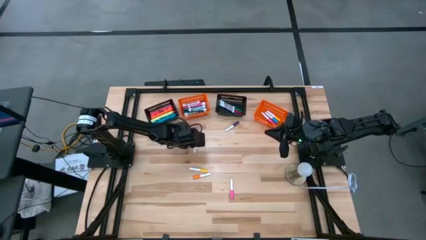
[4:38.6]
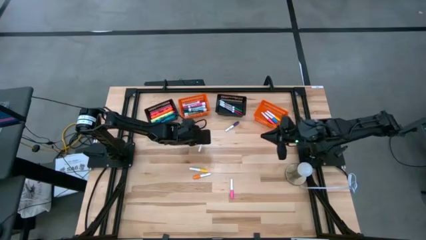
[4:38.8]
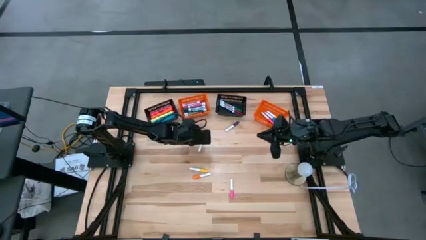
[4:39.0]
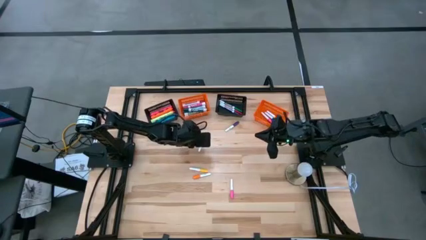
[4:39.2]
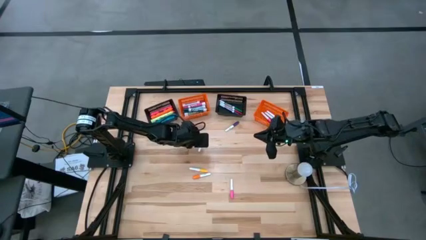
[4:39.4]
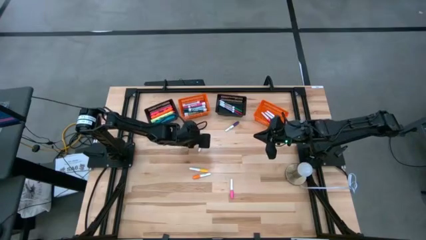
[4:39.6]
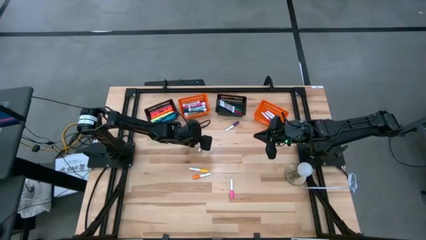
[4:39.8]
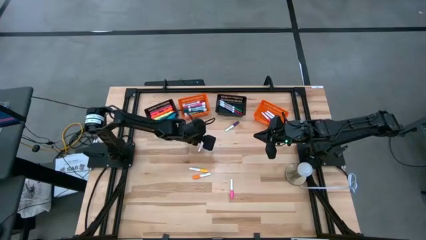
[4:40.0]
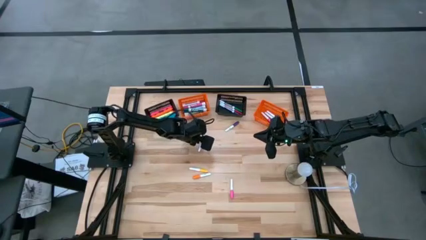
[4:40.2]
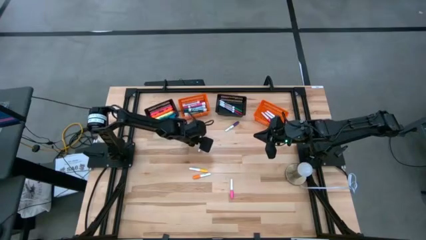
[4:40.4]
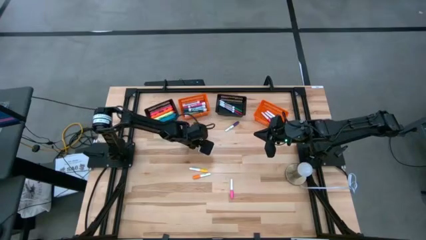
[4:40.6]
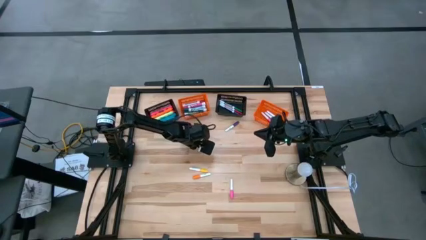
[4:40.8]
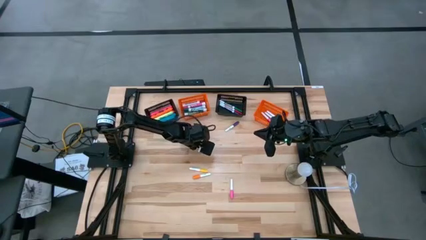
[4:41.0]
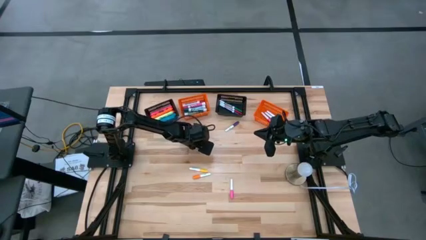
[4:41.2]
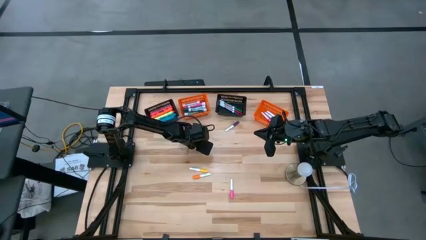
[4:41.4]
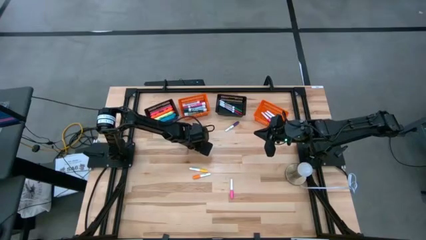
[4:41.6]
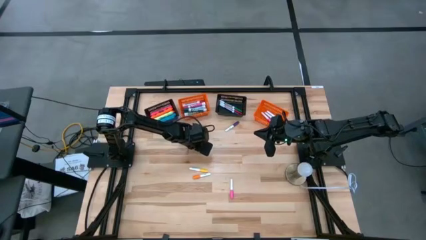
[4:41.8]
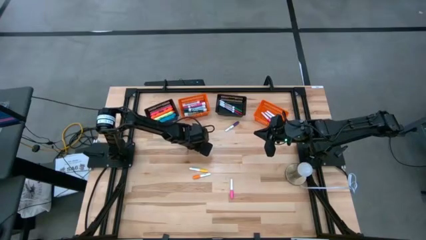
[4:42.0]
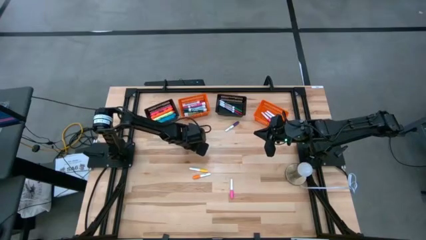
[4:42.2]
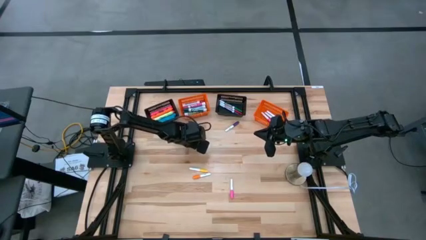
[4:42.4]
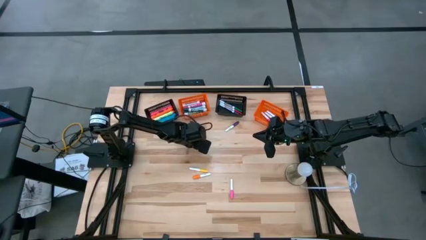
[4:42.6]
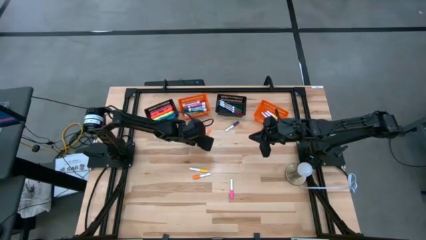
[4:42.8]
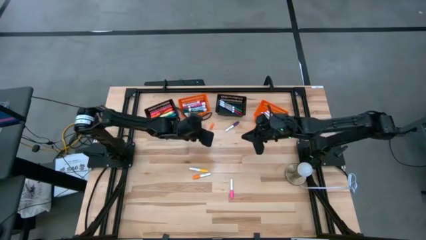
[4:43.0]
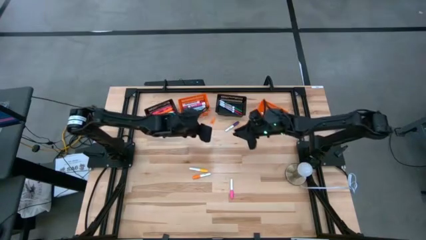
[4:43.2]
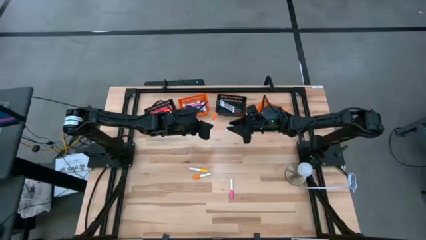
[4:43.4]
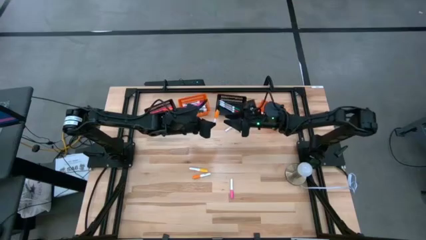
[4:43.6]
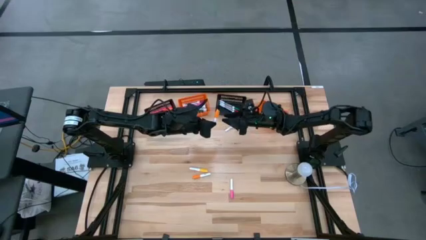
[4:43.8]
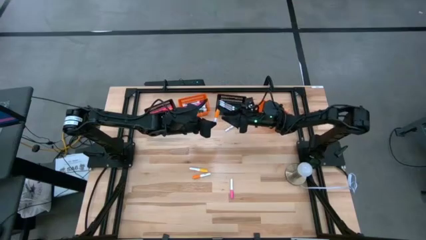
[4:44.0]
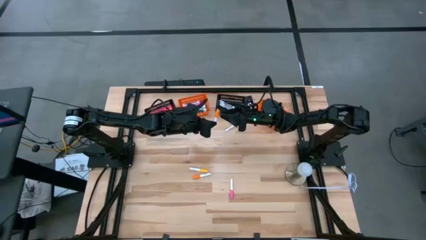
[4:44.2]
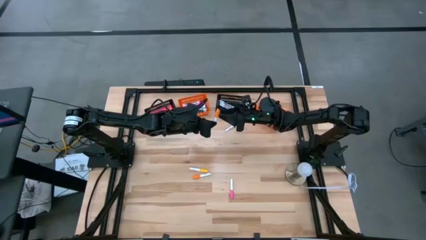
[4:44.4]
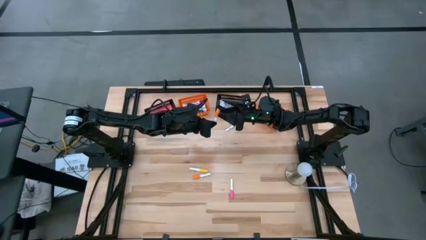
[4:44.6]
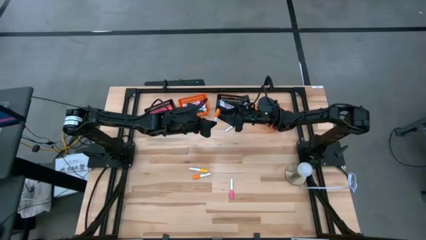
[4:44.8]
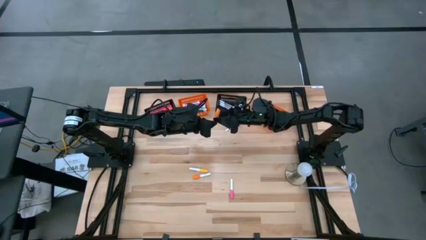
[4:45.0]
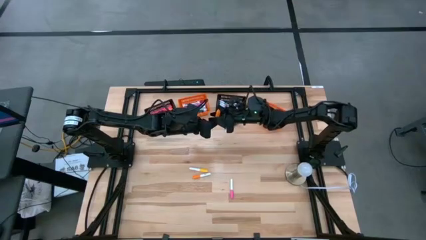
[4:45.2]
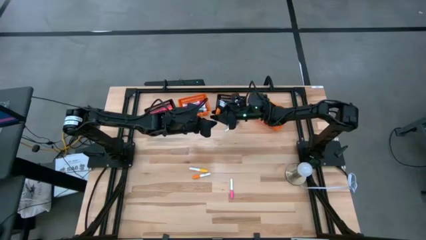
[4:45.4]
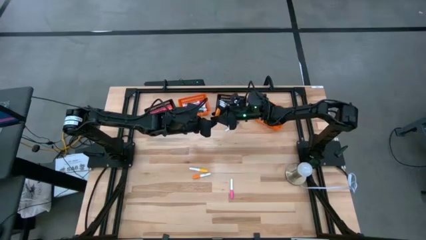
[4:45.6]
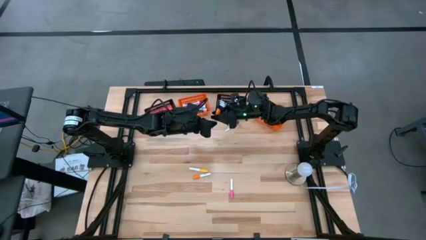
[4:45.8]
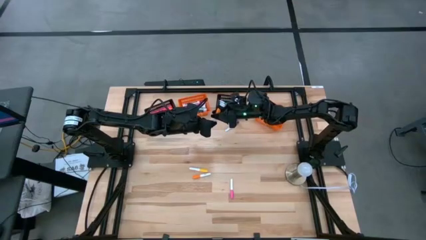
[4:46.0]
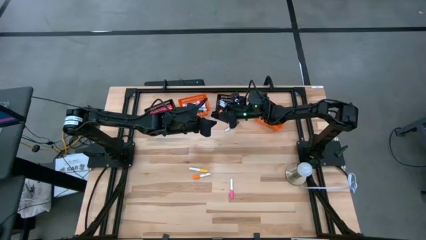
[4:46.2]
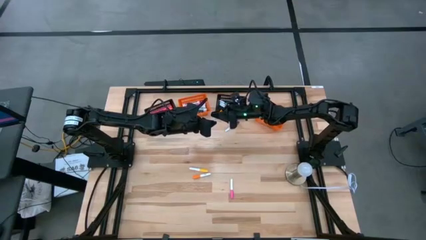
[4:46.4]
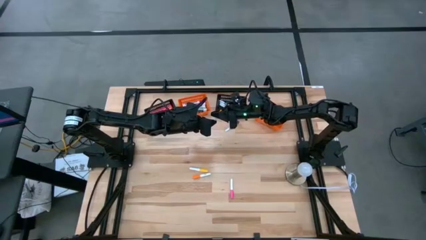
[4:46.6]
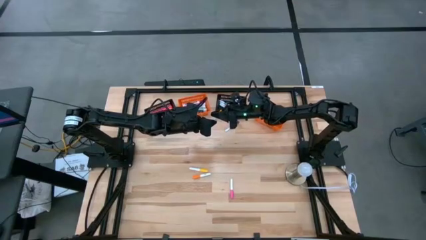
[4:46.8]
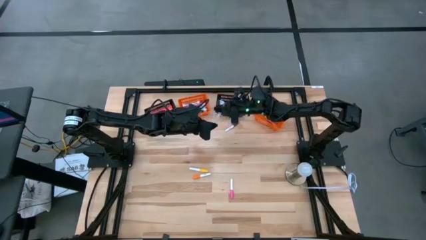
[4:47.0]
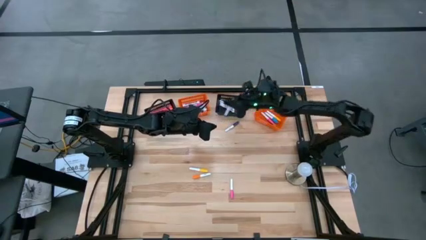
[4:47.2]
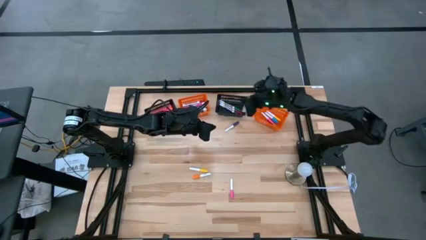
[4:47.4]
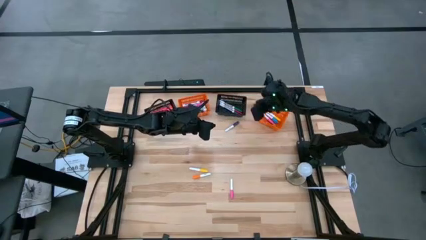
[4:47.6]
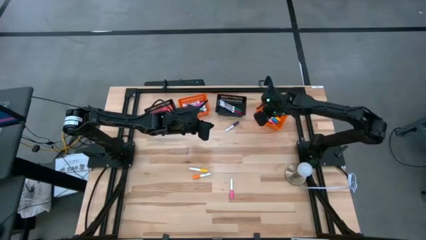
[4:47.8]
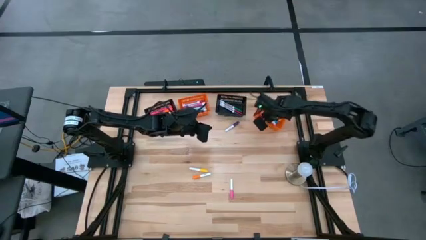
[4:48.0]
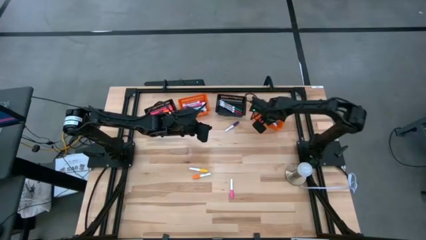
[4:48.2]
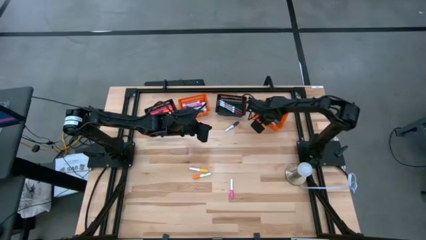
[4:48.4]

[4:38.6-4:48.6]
Task: Pick & Place Markers
Put the orange small highlighter pen into the left orange bin

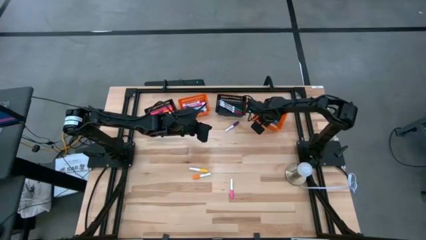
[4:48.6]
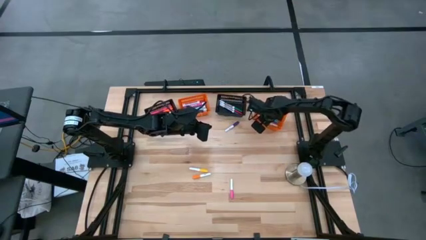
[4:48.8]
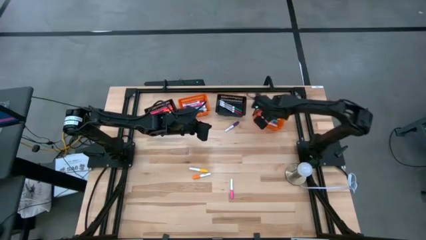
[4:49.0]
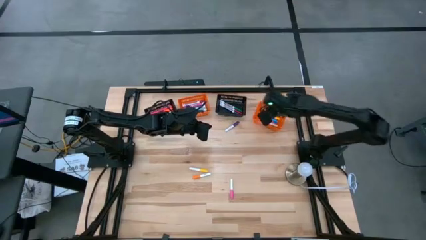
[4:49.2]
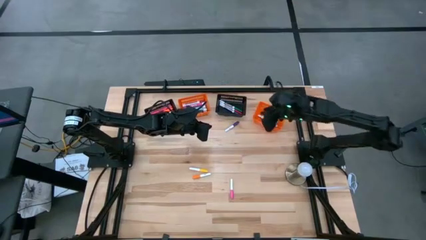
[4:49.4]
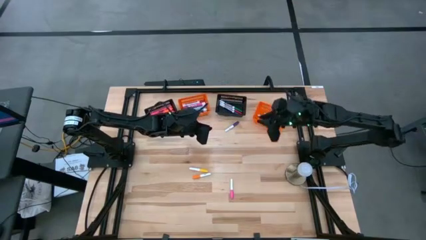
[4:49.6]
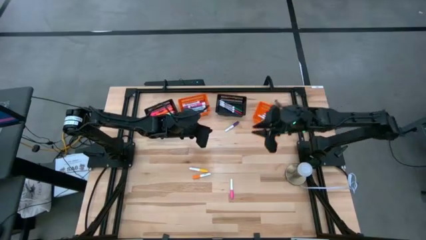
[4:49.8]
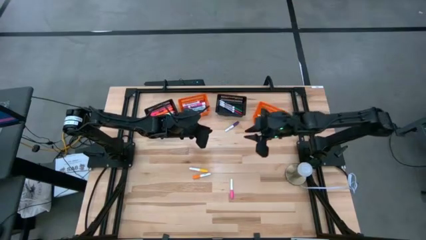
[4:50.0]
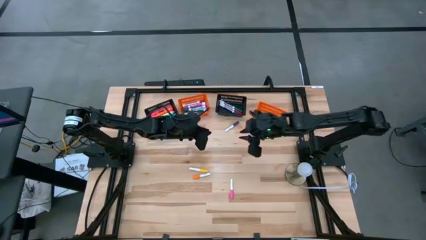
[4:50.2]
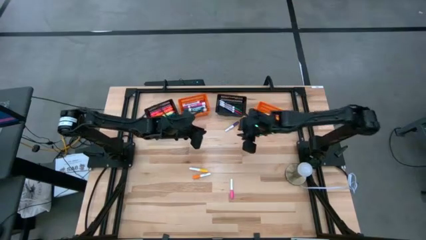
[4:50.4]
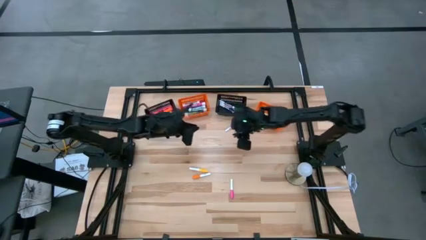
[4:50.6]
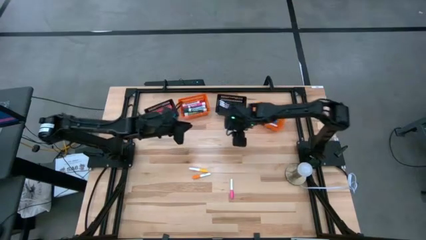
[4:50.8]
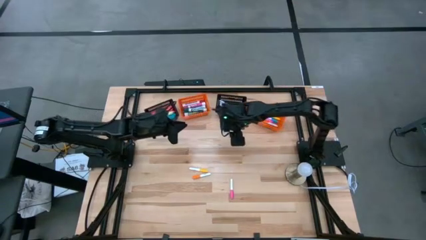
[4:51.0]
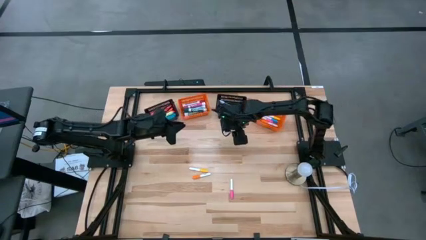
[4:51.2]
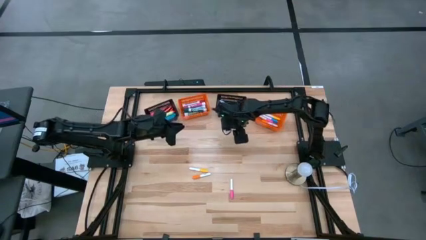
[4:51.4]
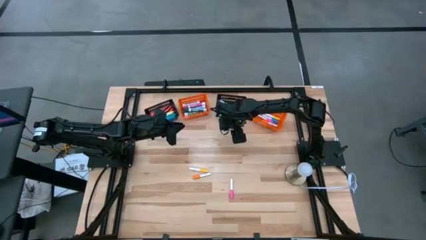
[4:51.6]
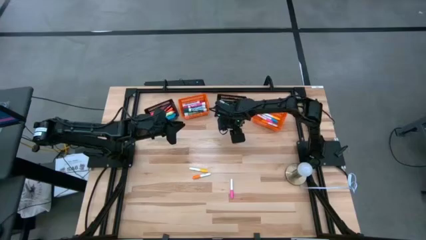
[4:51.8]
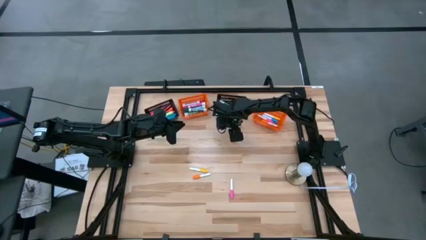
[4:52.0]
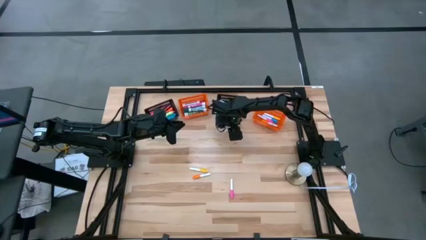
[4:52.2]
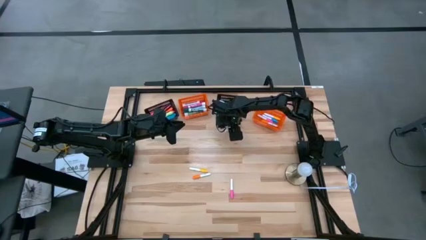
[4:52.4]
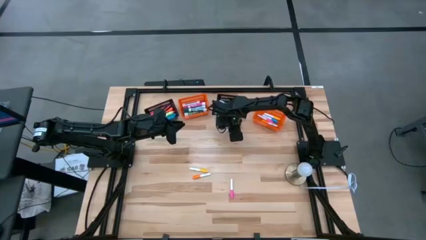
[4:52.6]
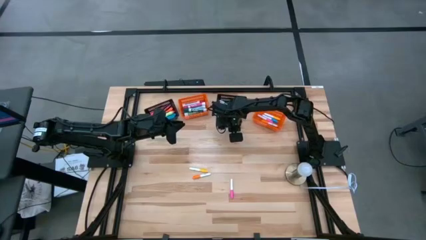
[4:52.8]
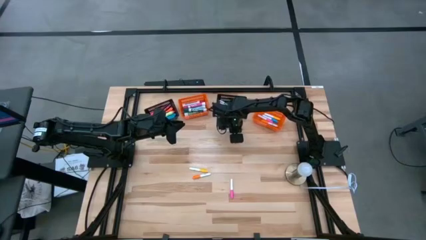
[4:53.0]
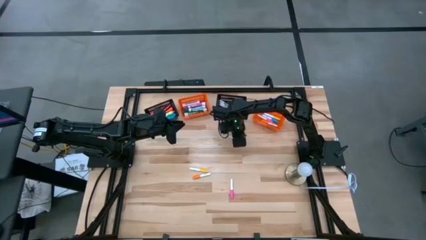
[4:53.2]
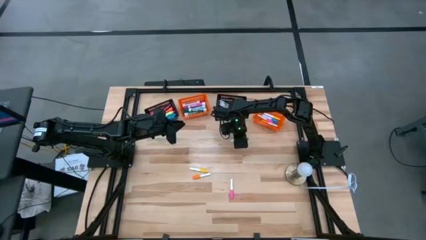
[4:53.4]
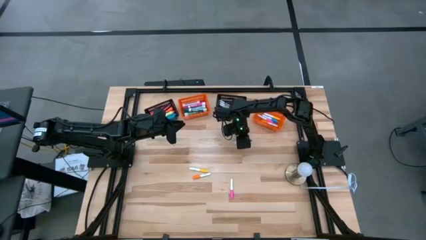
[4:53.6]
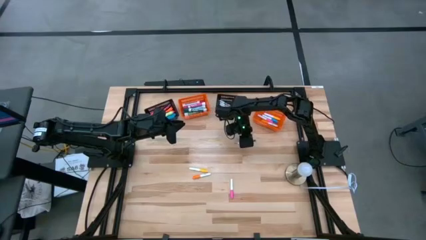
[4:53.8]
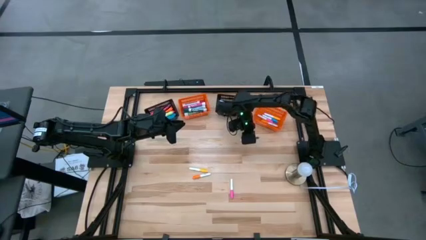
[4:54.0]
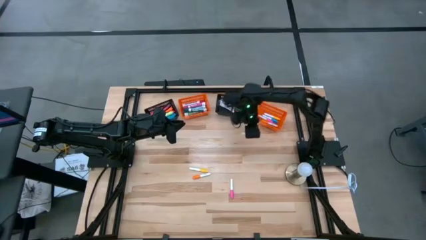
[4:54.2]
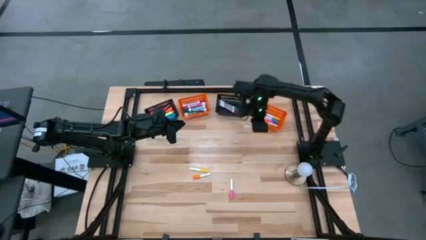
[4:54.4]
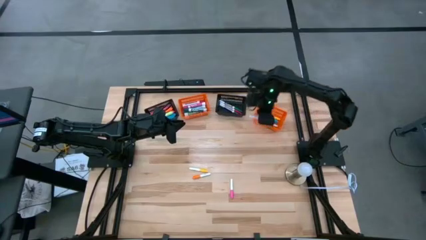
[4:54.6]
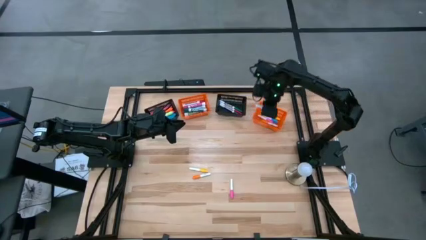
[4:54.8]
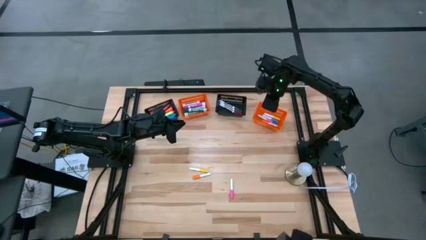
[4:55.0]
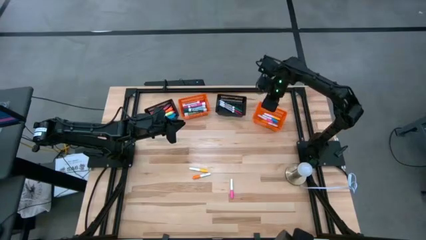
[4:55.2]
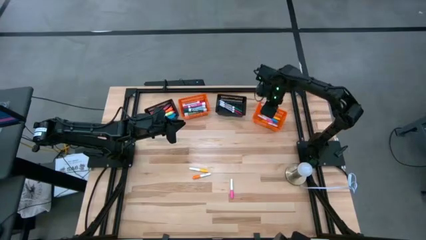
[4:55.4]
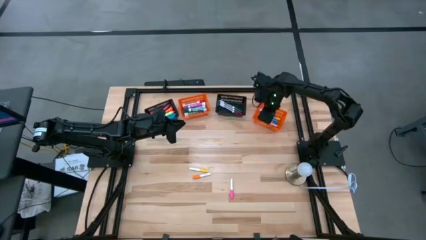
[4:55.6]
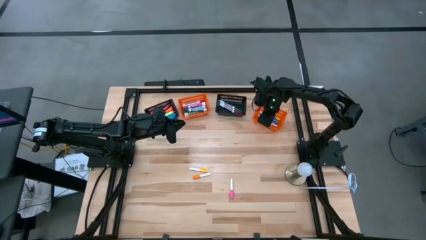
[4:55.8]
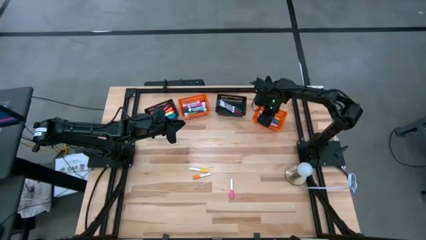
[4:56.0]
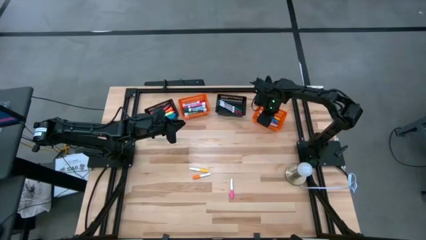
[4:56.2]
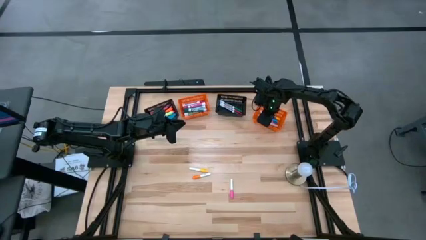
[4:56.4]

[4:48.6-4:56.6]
Put the purple small highlighter pen into the left orange bin
